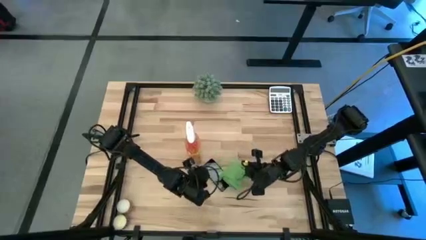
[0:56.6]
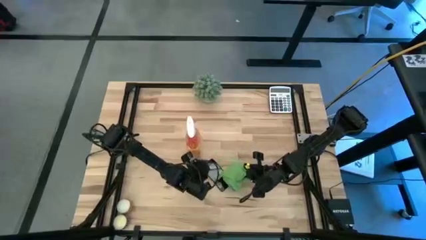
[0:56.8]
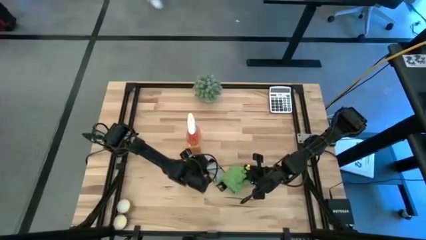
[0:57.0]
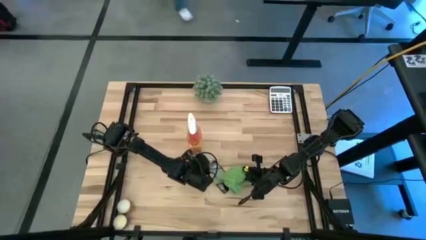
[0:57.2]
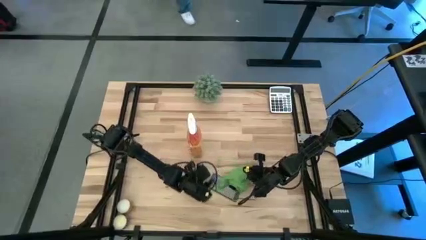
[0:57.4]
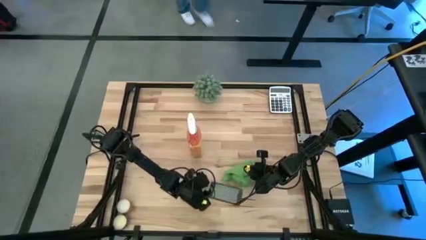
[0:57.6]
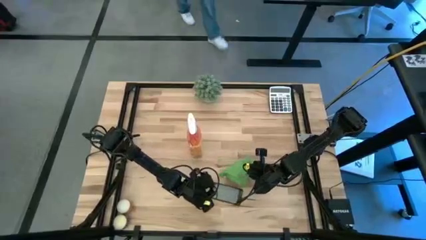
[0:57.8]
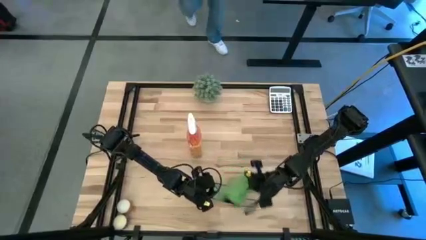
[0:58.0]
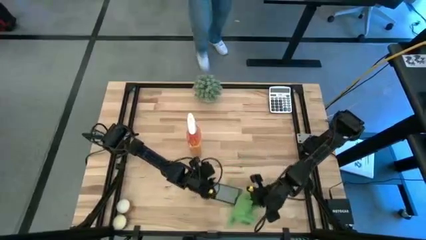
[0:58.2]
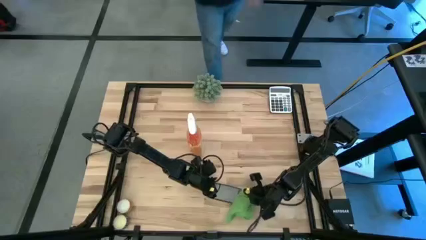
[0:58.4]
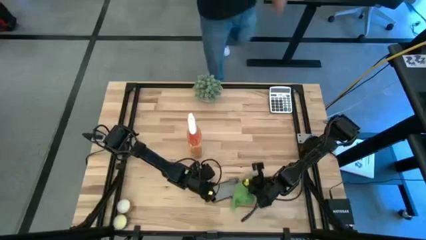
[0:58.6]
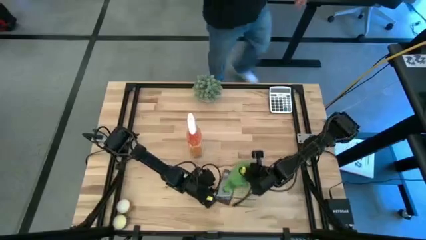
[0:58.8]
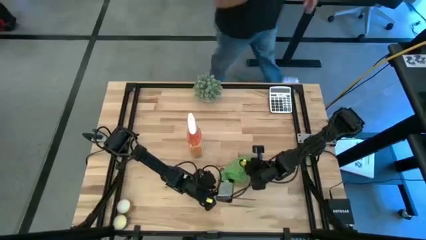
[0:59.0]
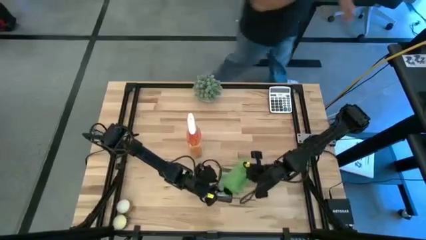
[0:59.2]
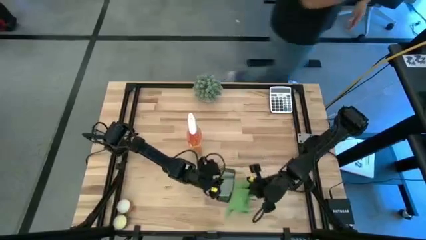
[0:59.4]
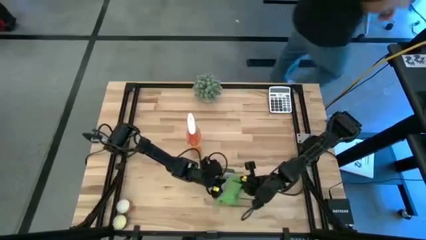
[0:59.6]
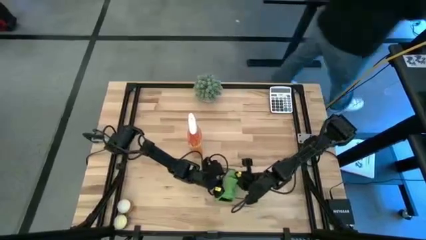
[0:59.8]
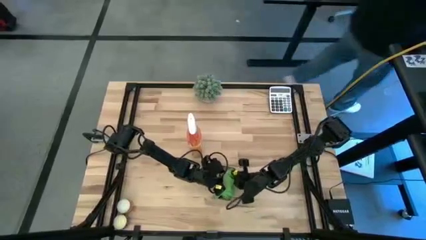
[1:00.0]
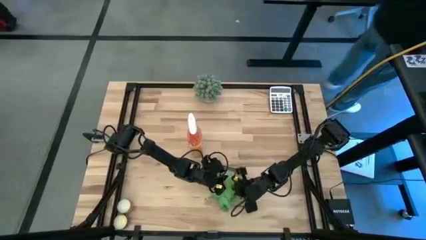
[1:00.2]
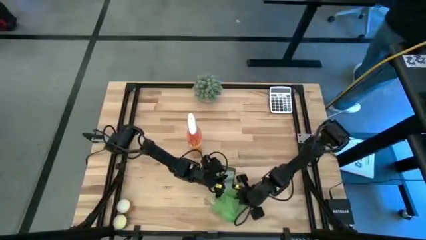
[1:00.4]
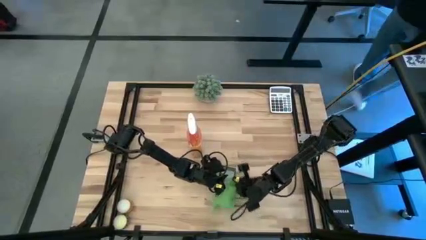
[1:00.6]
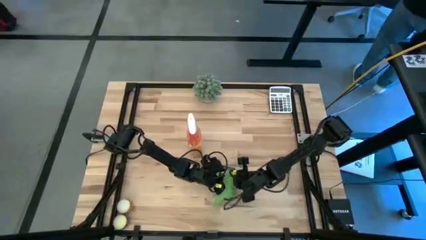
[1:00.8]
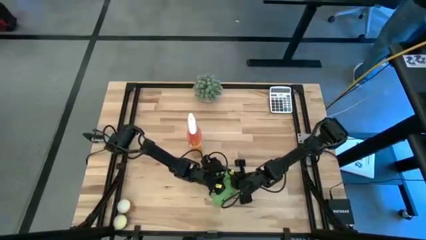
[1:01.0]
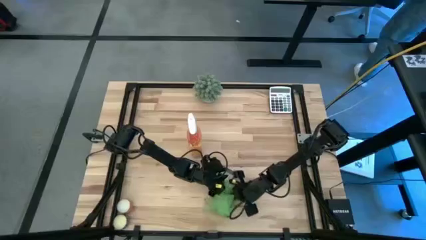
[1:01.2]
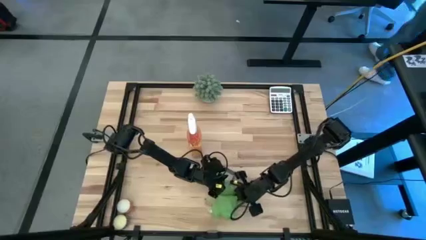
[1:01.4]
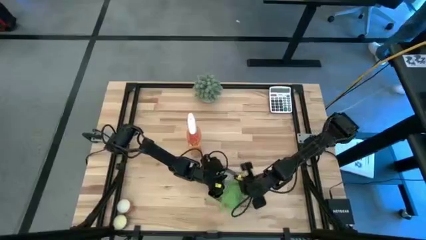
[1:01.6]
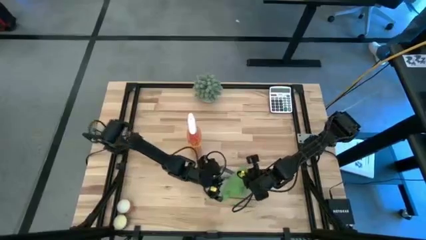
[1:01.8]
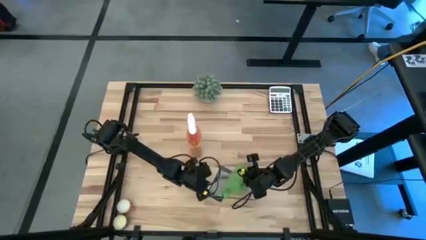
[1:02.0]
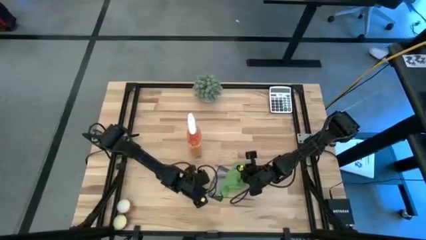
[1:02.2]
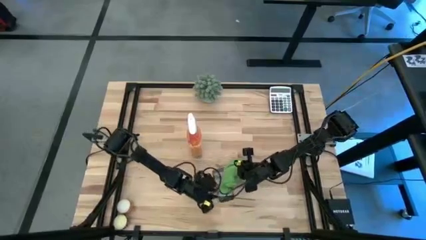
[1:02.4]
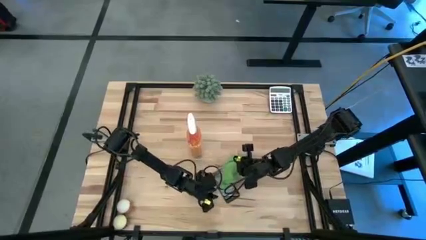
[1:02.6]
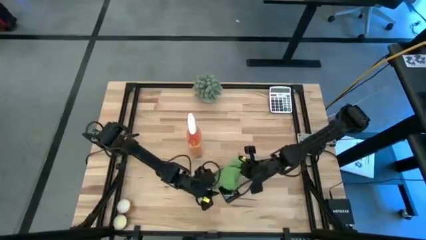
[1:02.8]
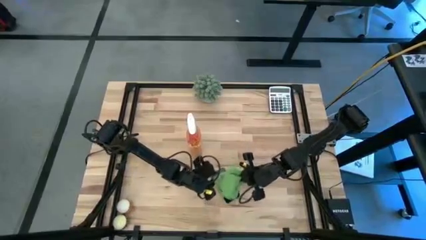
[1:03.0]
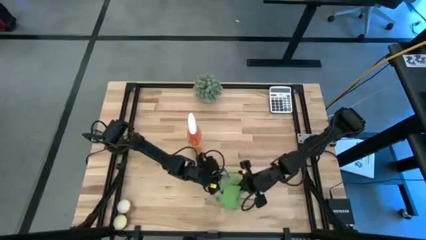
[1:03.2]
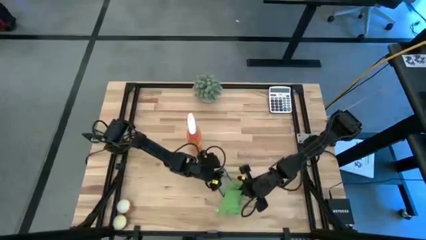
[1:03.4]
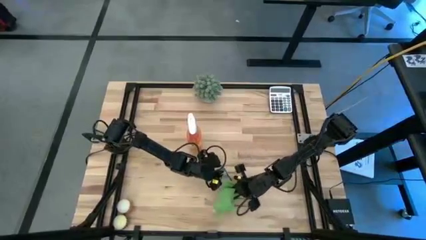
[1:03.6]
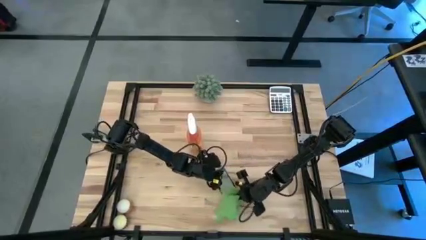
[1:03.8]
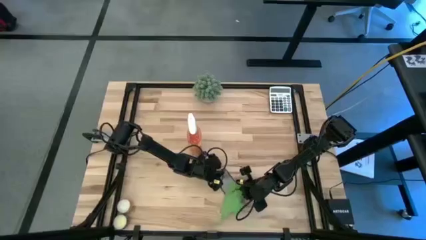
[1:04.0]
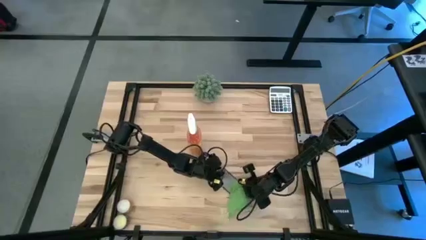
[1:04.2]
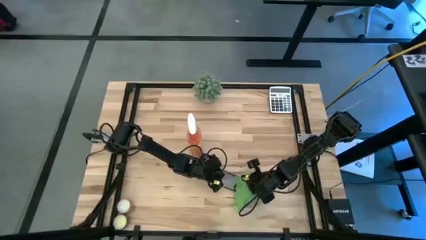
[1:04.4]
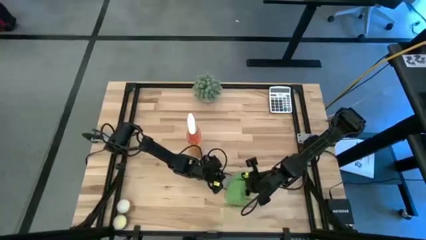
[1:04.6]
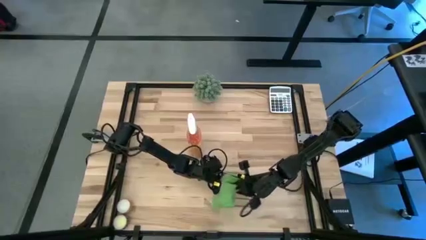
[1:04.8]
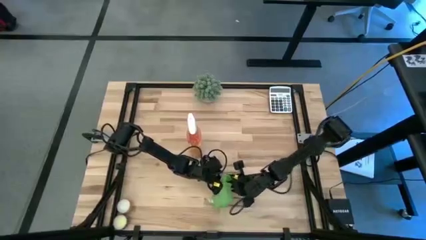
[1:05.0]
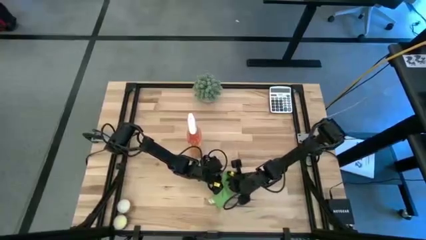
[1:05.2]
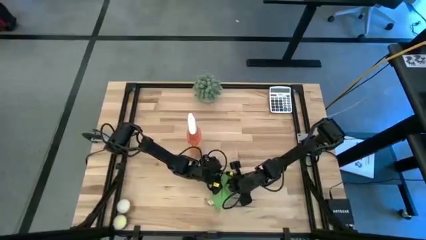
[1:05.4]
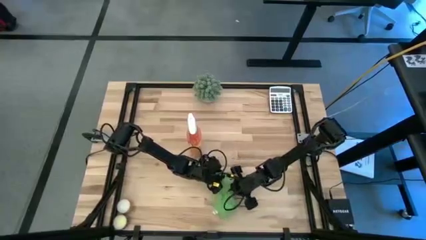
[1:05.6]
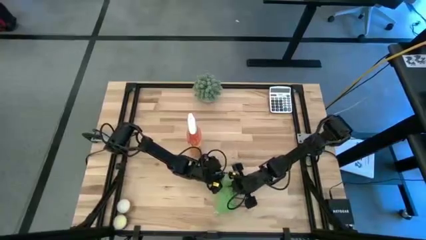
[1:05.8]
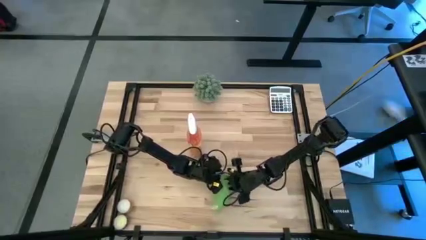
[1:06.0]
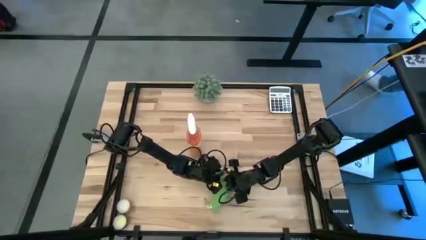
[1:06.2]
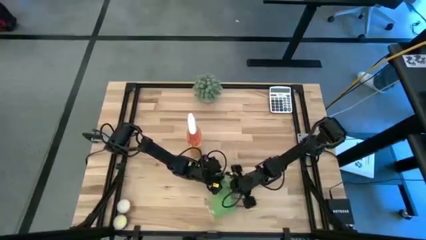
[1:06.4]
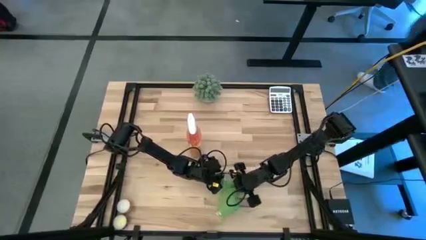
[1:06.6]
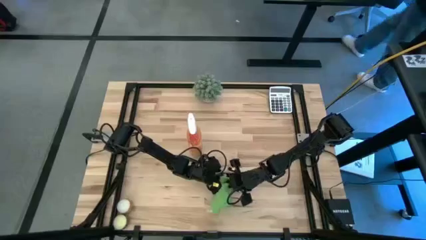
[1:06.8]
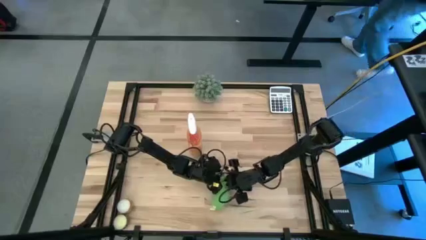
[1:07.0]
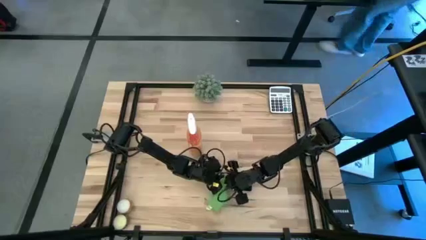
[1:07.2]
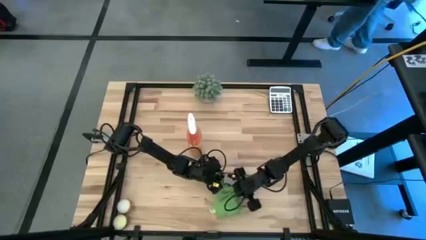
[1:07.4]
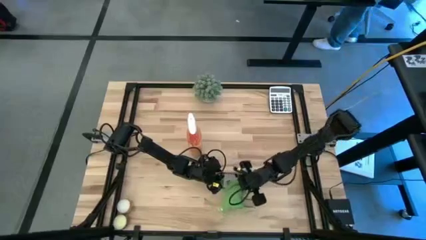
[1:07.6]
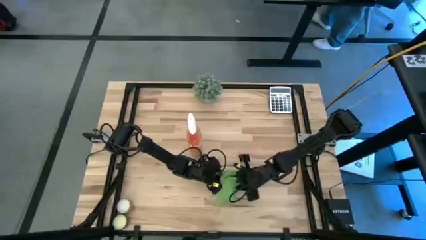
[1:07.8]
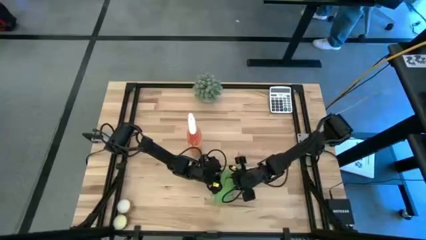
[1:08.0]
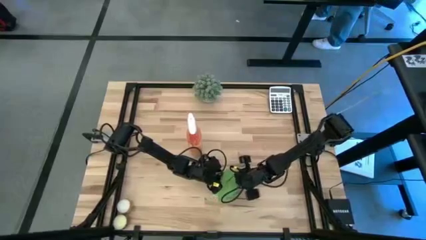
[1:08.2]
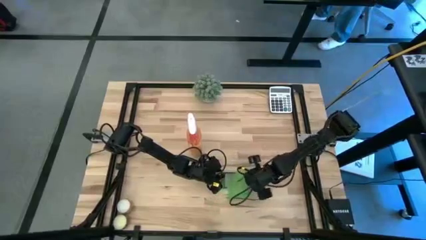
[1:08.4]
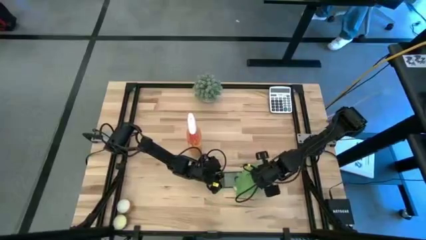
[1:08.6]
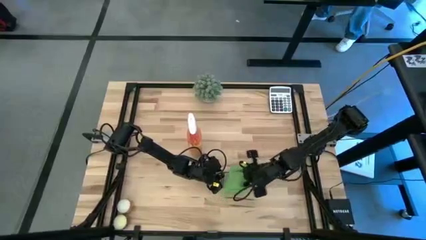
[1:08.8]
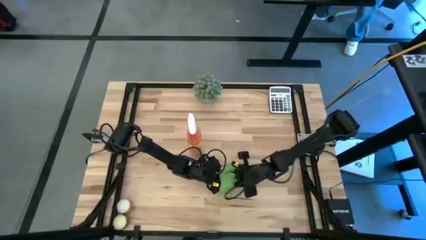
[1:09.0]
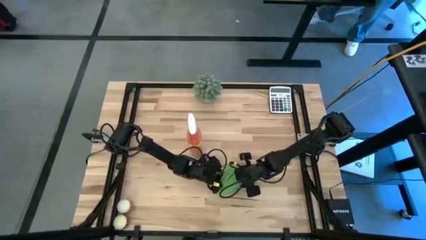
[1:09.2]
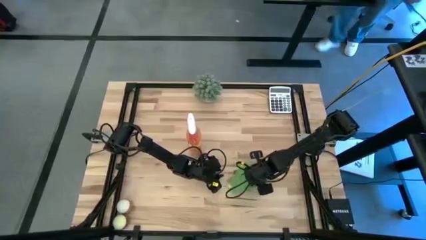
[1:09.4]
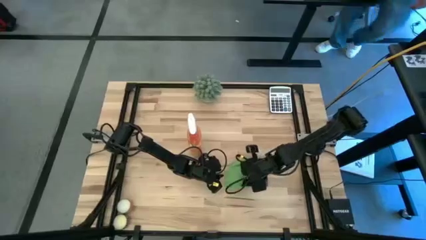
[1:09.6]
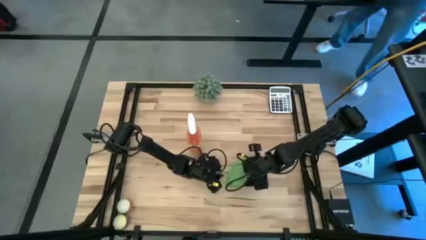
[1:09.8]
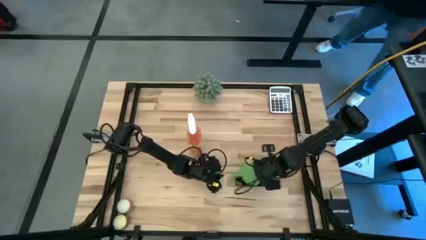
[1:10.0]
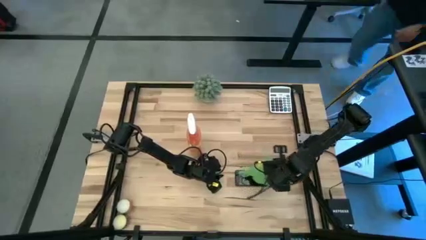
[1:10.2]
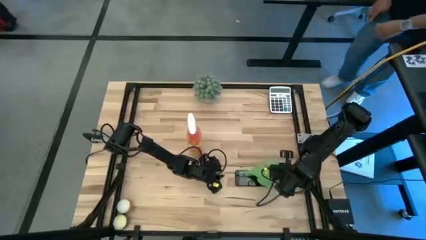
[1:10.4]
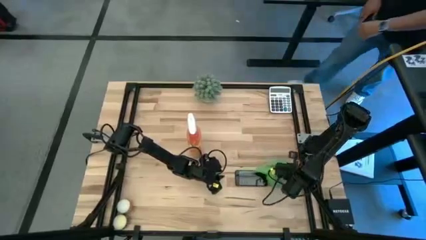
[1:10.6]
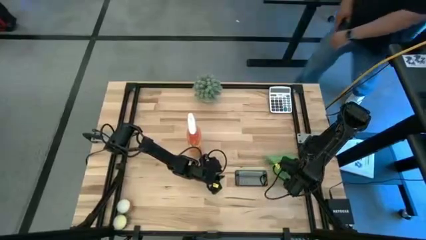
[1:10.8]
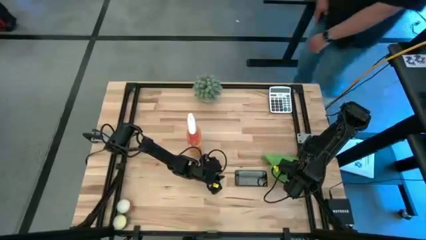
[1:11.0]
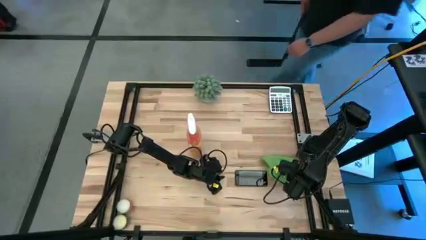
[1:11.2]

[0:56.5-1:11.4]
Task: Apply microfiber cloth
Wipe the front of the black cellphone using the green microfiber cloth
